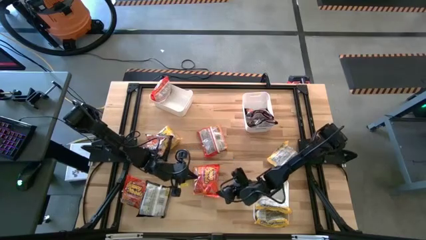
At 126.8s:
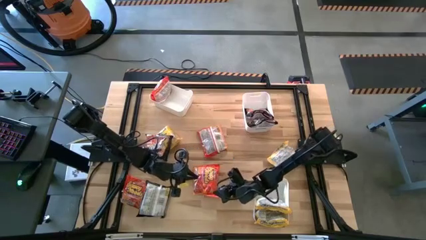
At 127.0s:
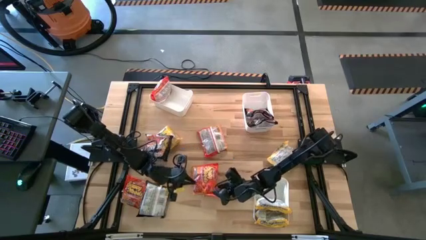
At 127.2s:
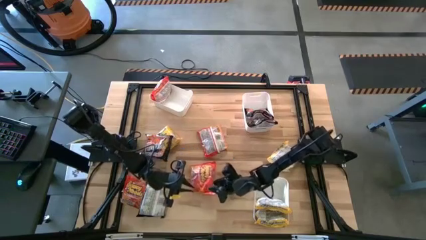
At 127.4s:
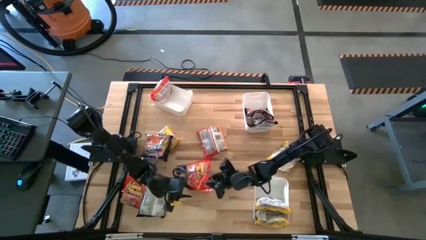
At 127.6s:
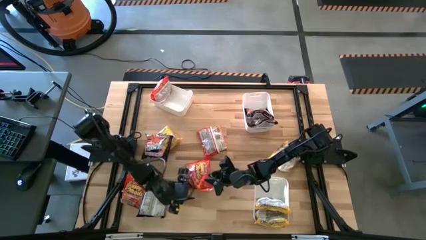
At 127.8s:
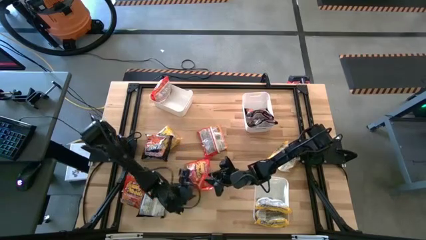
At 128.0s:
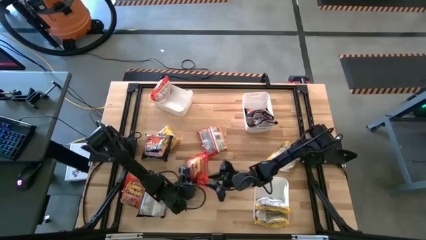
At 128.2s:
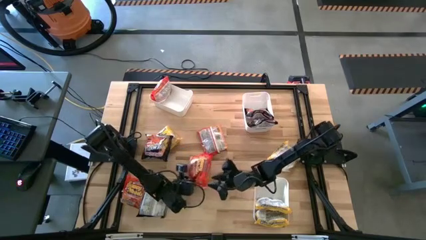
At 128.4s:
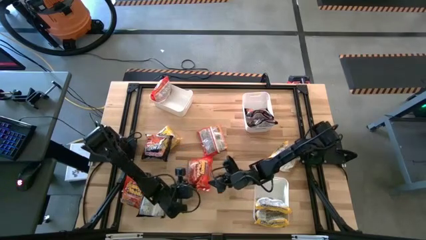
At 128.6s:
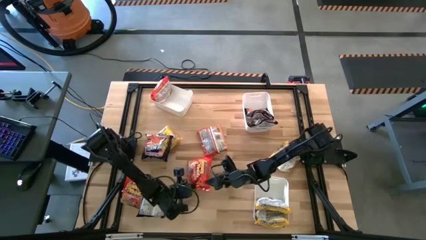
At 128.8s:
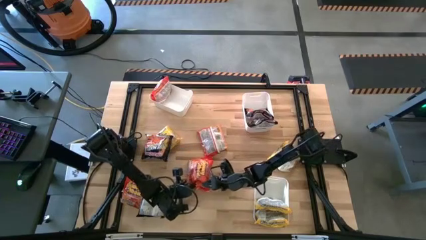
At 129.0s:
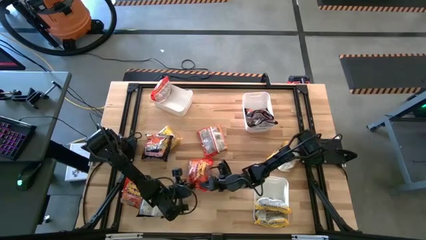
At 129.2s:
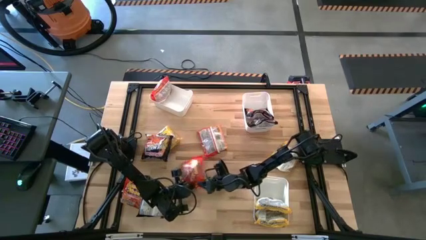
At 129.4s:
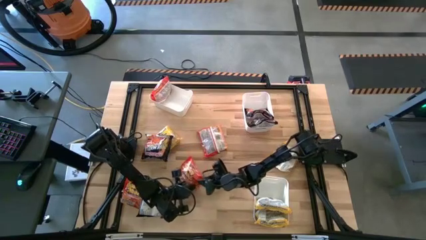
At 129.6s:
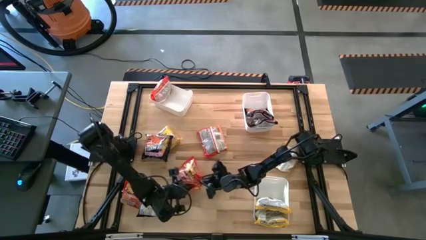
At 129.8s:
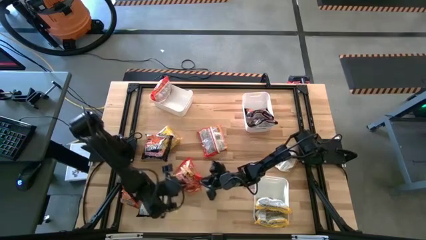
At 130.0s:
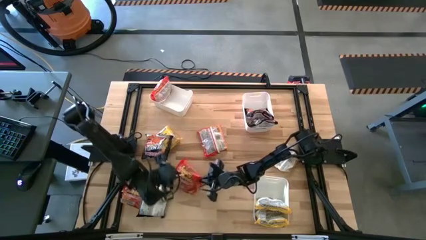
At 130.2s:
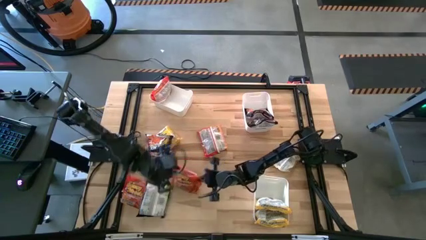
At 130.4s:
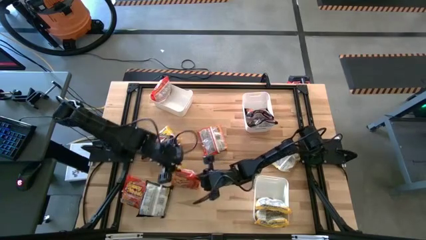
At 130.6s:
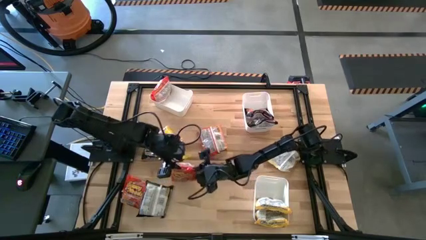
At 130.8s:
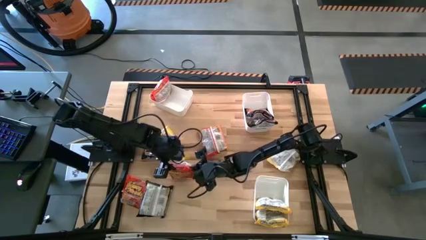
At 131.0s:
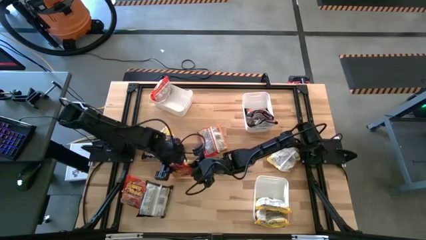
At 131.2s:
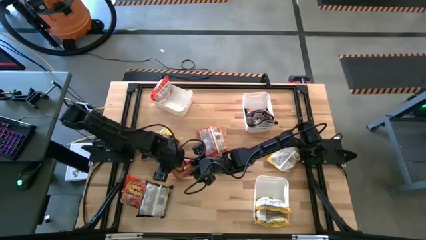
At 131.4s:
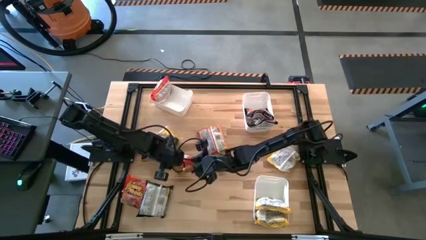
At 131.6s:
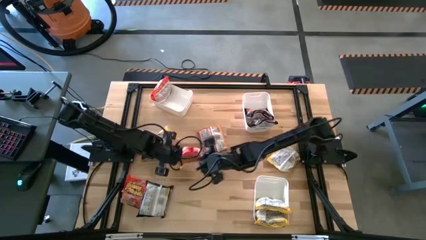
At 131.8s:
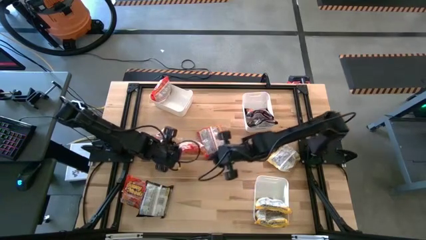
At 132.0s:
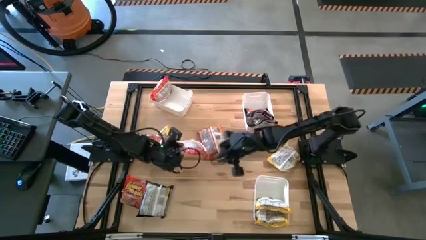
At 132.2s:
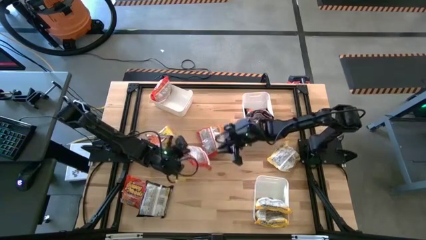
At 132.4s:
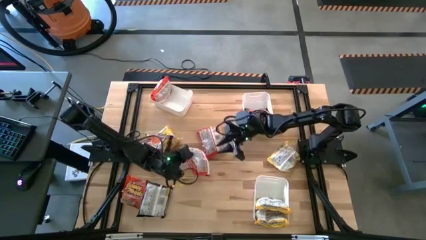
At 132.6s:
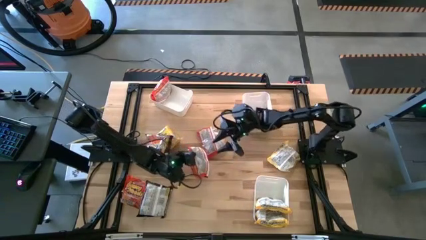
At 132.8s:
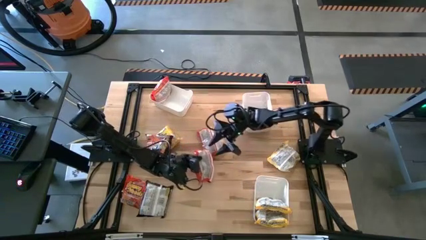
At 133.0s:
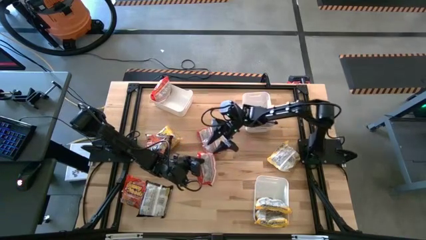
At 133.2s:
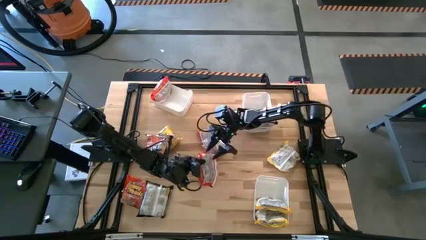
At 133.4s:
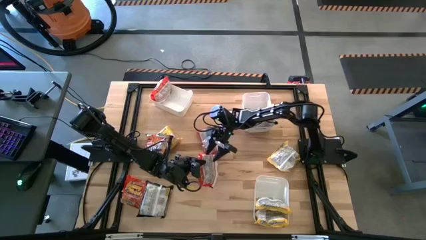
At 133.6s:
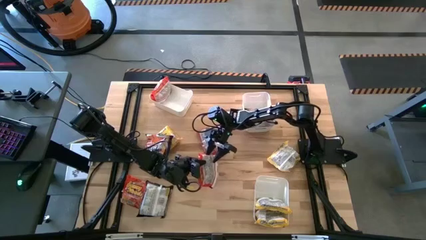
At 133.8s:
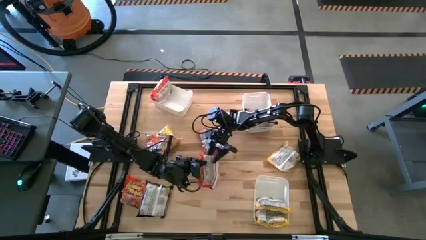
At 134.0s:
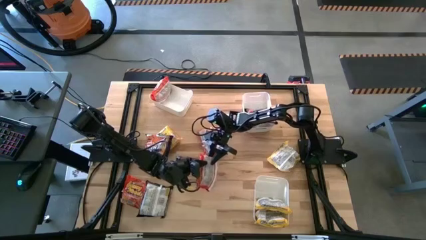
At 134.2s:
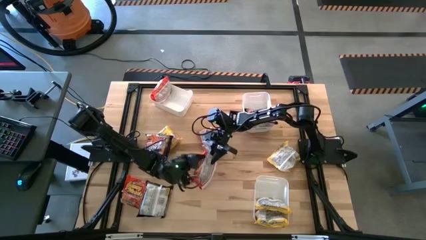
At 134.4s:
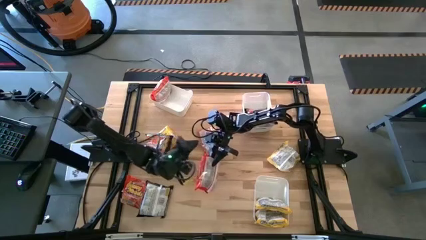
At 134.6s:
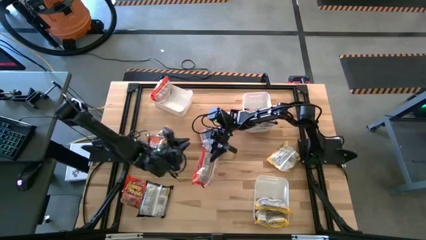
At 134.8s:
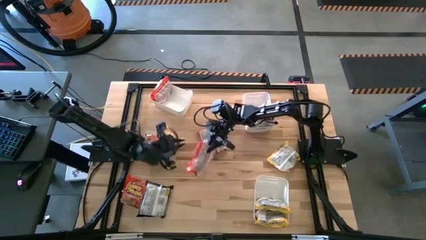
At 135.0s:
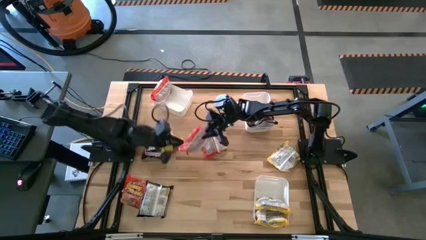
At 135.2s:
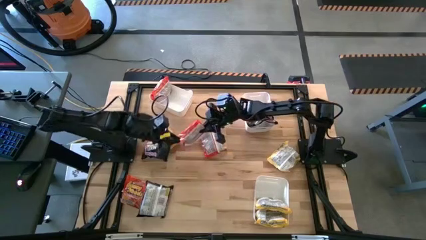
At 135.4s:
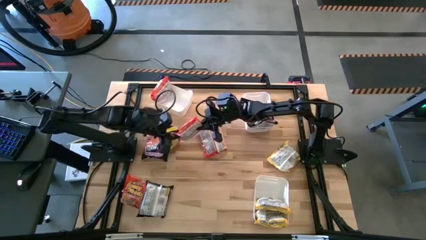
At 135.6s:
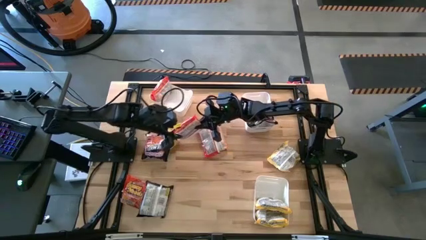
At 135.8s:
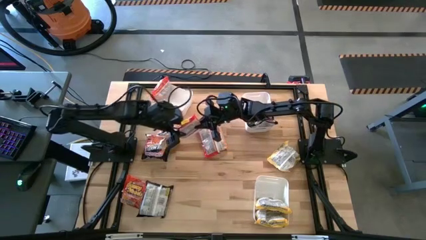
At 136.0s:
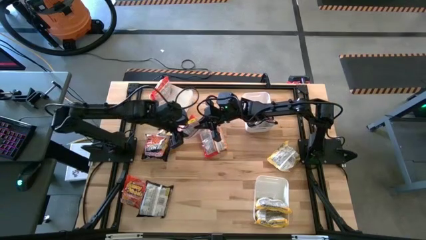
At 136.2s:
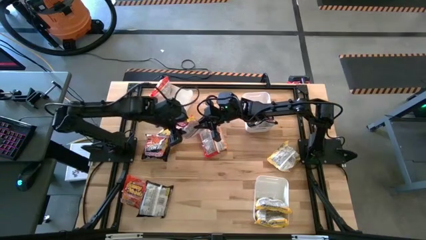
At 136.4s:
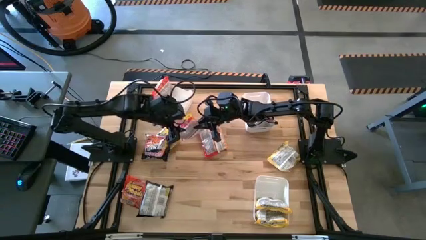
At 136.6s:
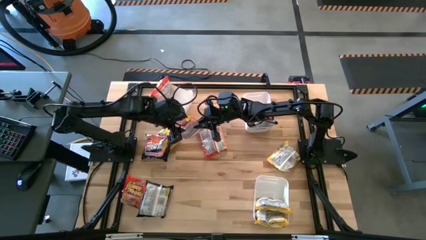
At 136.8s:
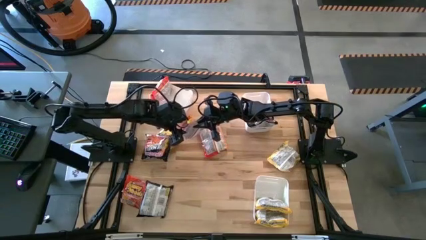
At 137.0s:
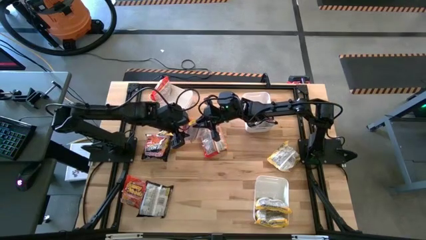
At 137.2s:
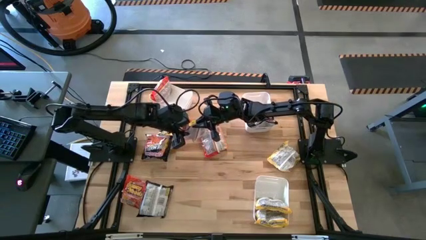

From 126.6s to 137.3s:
Task: Sort Maruchan noodles
Put the orange noodle pack into the top left white bin

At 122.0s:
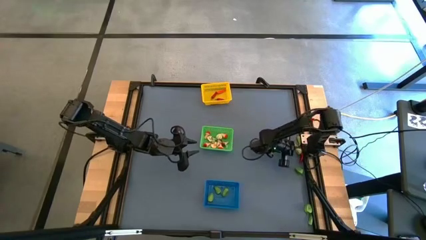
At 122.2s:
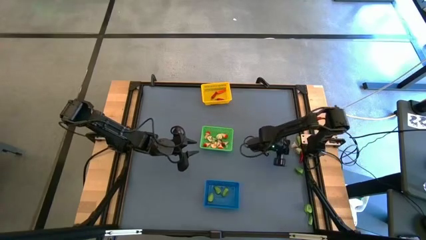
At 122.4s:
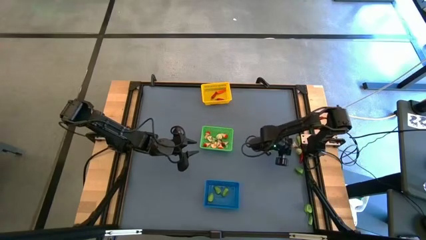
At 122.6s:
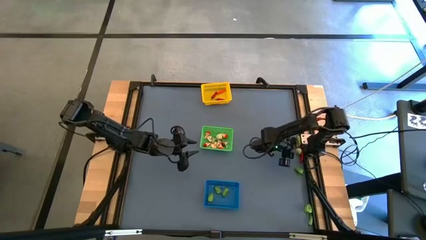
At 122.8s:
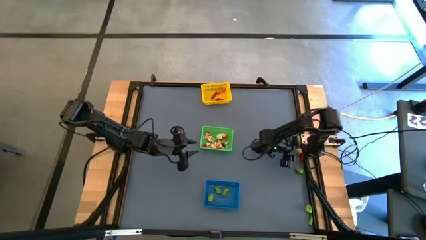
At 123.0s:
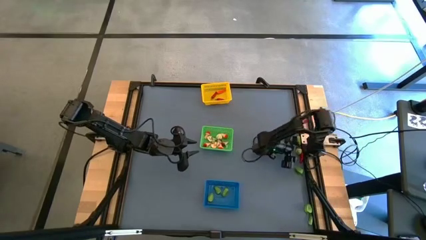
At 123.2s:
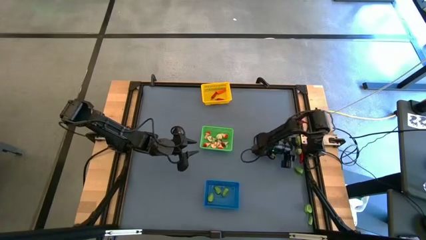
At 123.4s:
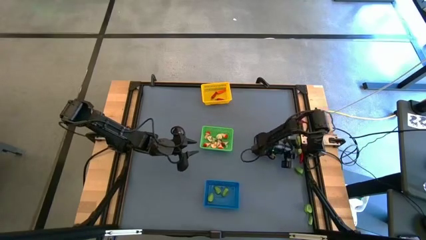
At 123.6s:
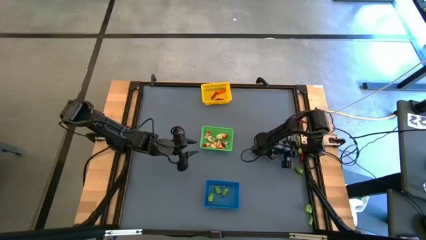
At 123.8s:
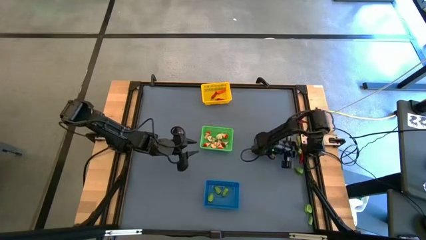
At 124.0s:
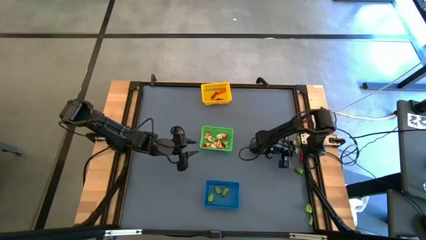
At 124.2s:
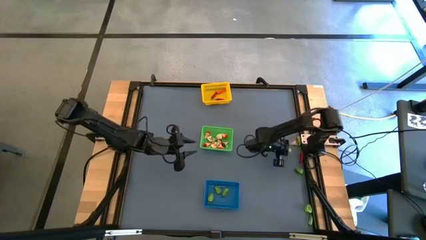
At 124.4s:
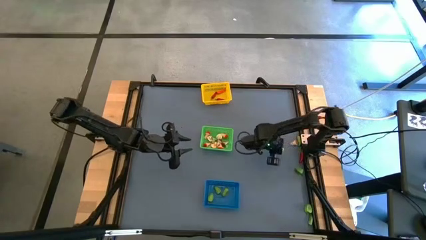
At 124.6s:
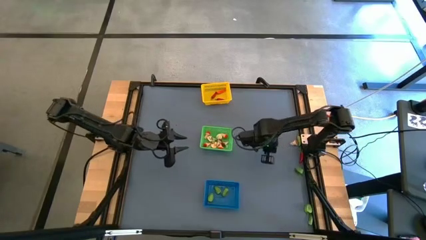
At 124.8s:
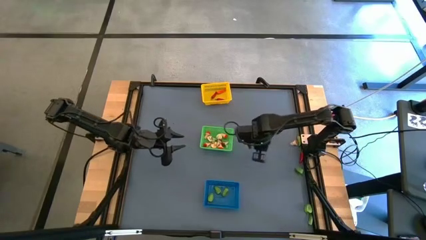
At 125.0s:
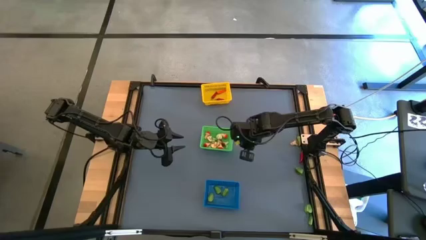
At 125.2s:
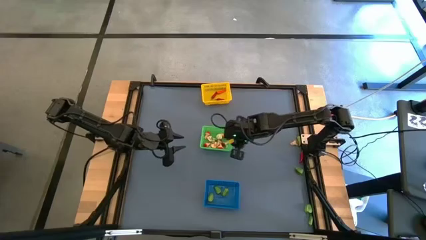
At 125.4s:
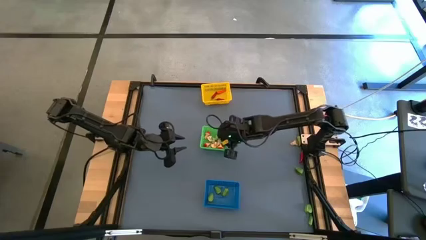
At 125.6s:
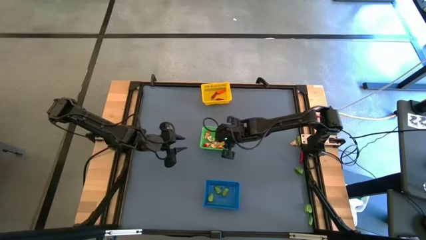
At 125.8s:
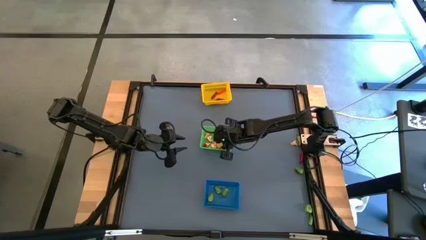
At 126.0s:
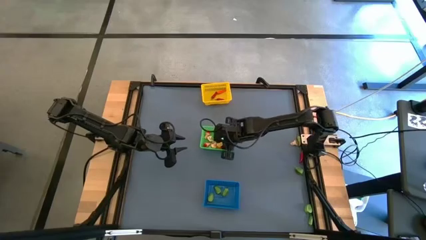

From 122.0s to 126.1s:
Task: Sort produce into baskets
Put the green mushroom into the green bin

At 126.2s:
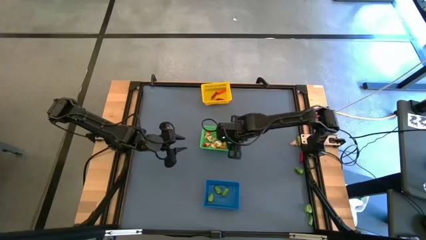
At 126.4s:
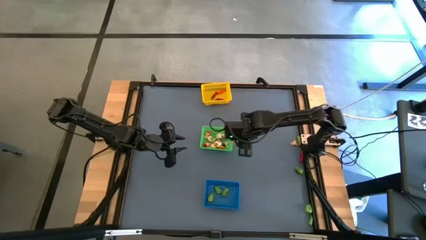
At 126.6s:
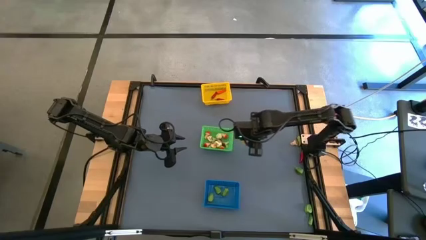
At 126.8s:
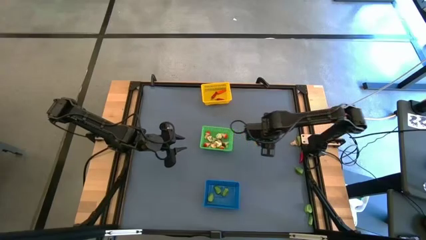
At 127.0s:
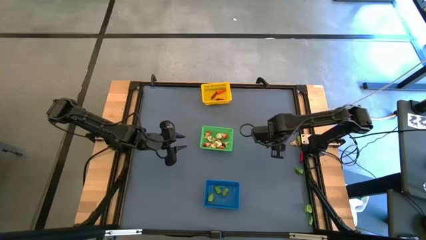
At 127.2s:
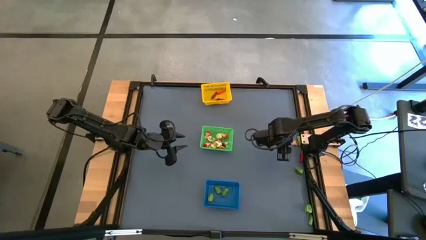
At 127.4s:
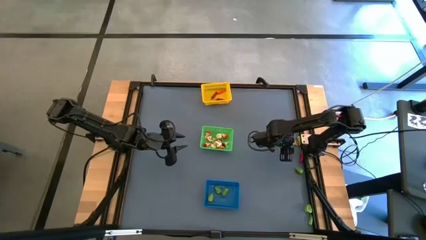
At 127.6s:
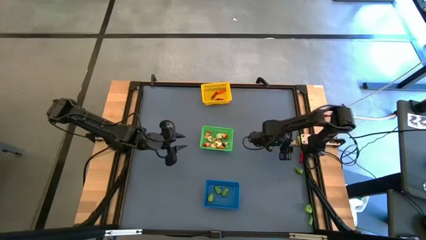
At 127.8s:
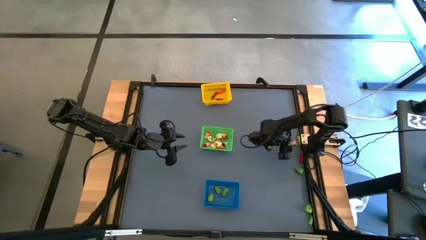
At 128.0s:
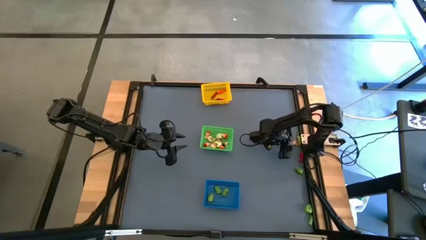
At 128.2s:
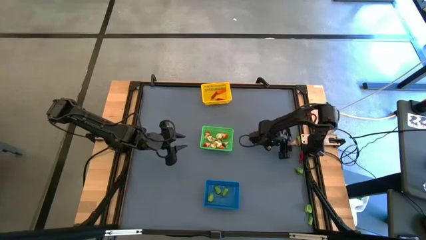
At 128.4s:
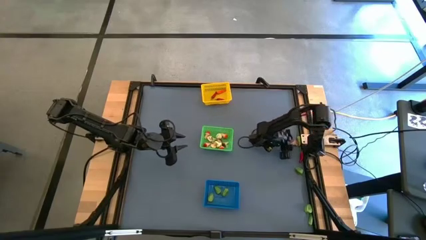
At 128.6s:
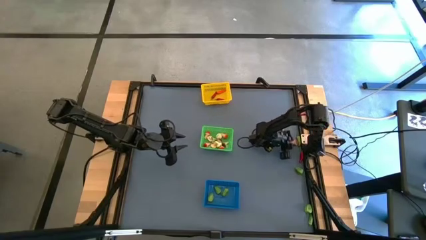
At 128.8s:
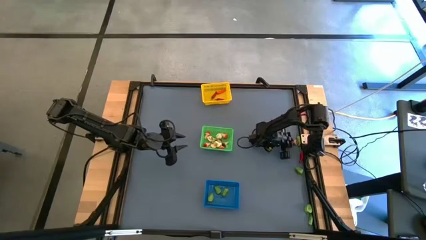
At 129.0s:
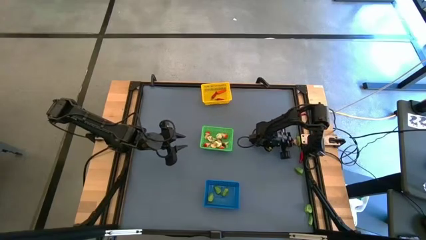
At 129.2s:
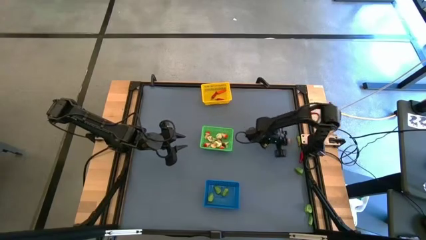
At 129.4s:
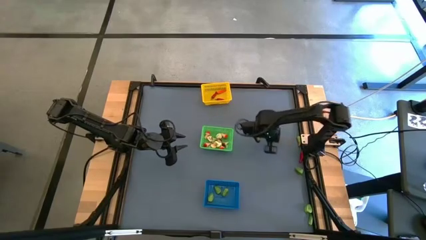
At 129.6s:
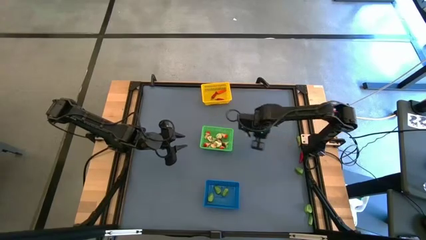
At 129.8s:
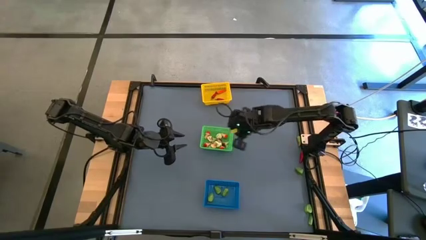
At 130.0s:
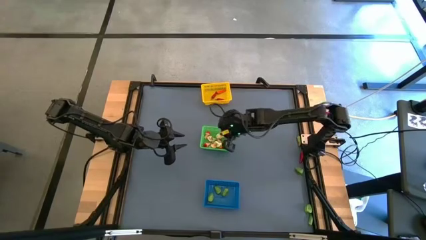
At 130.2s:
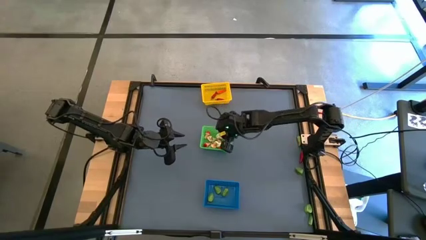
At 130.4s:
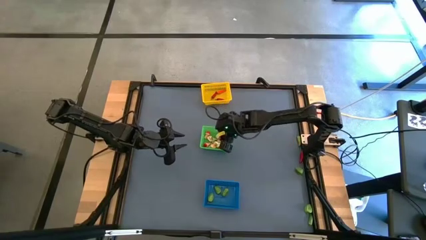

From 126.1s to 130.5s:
Put the brown mushroom into the green bin
